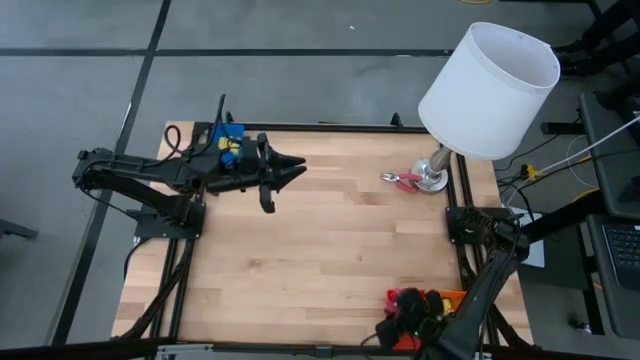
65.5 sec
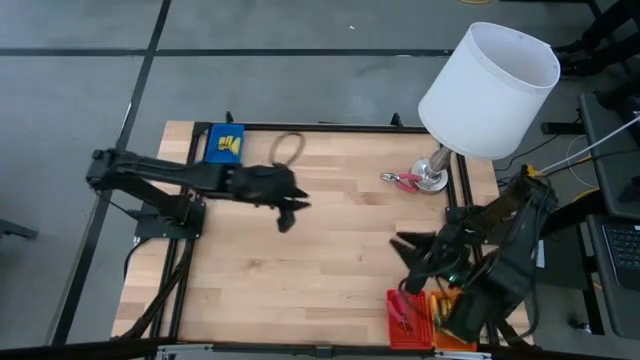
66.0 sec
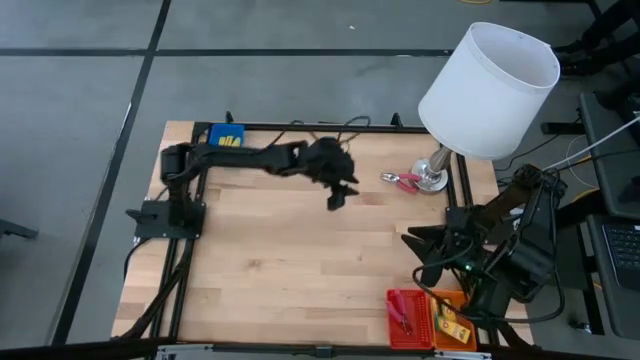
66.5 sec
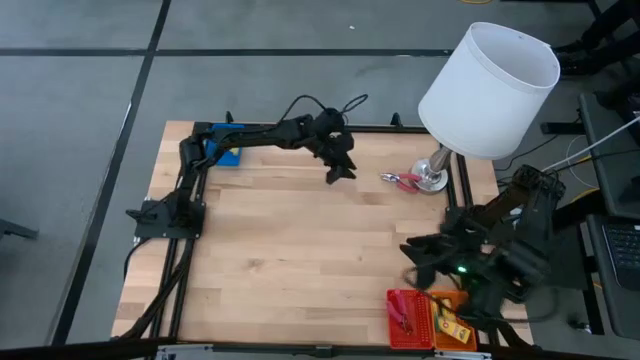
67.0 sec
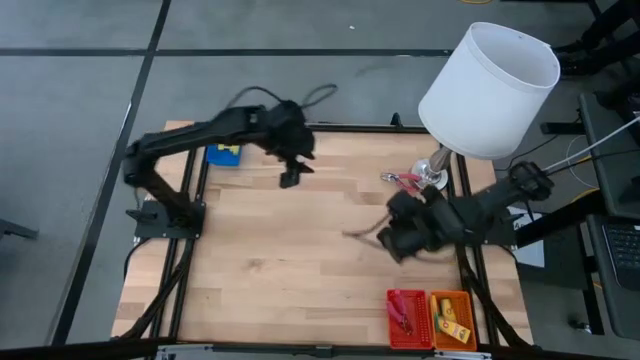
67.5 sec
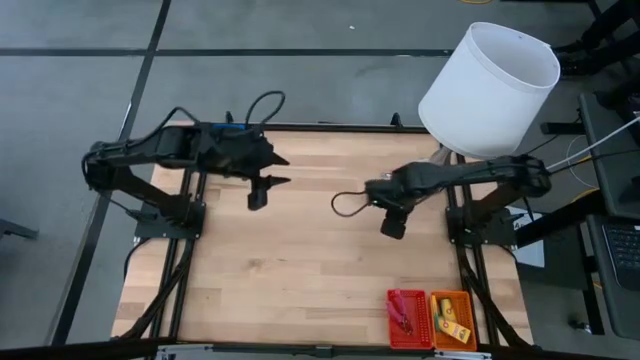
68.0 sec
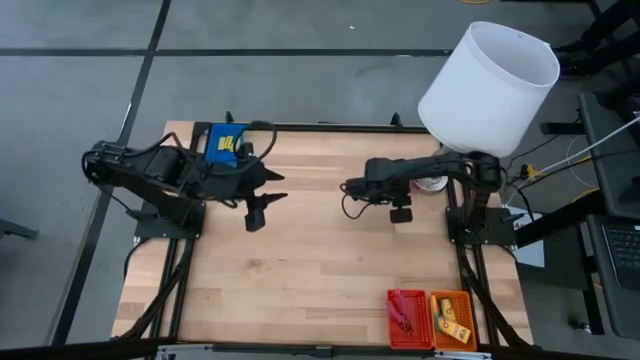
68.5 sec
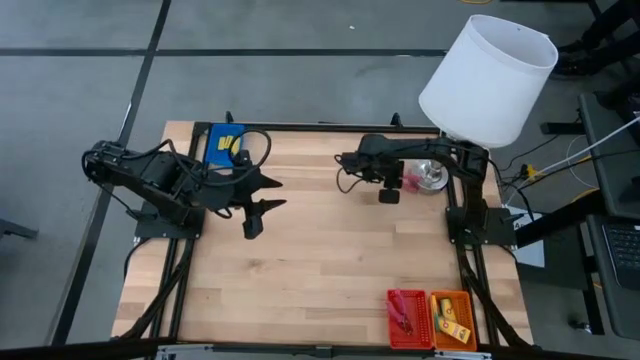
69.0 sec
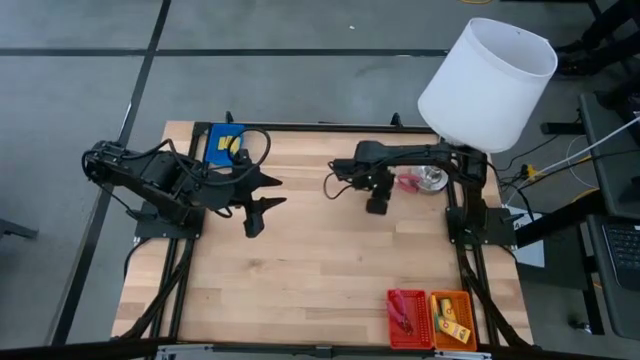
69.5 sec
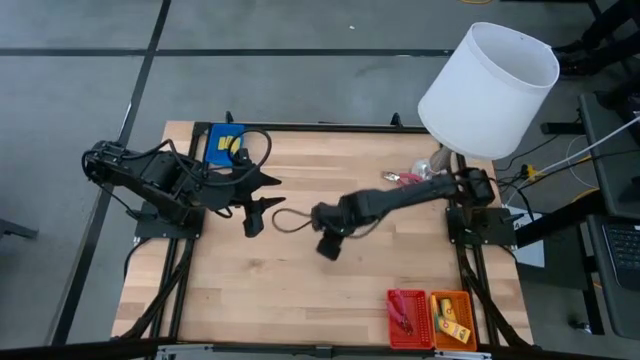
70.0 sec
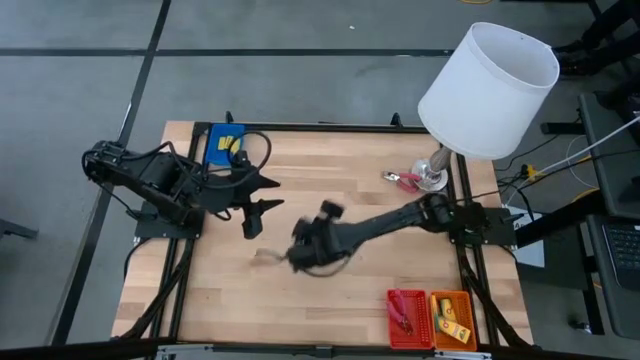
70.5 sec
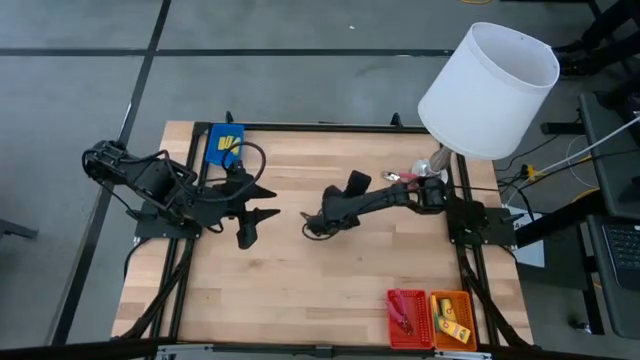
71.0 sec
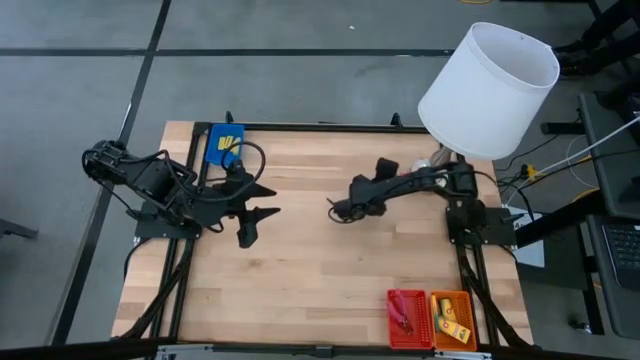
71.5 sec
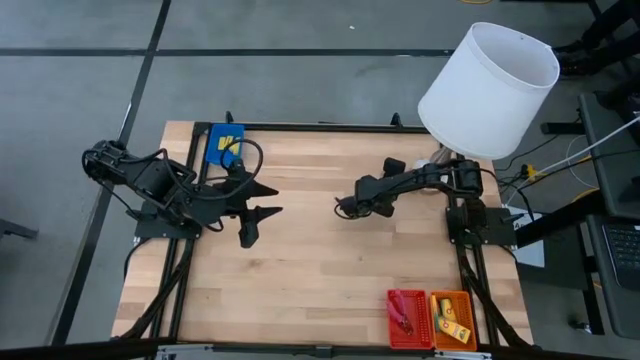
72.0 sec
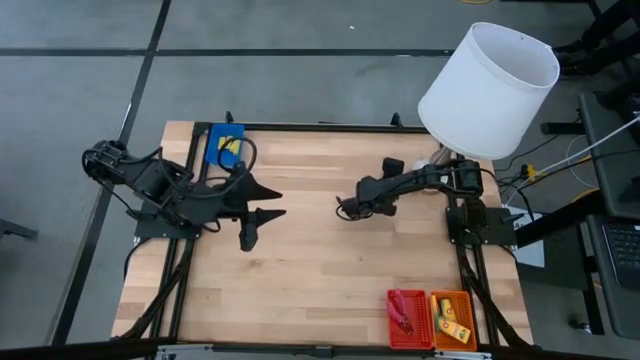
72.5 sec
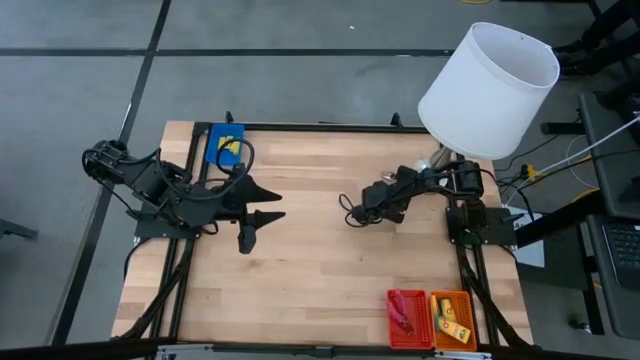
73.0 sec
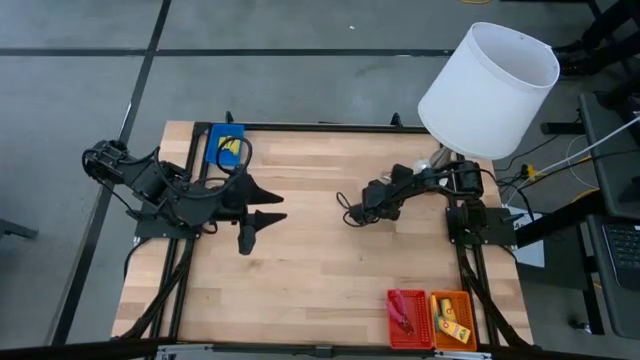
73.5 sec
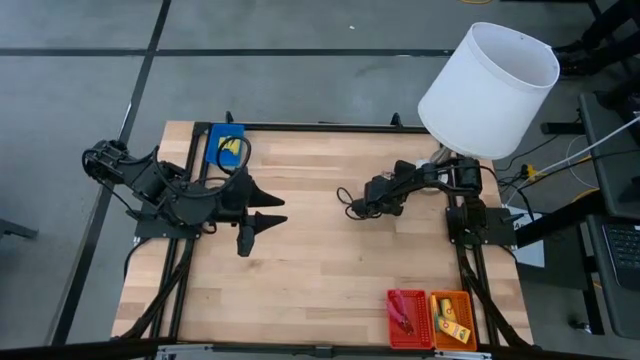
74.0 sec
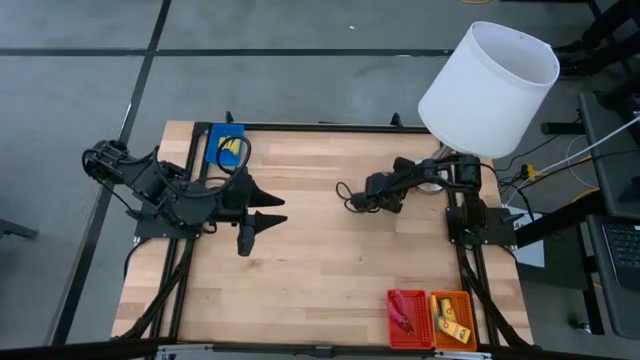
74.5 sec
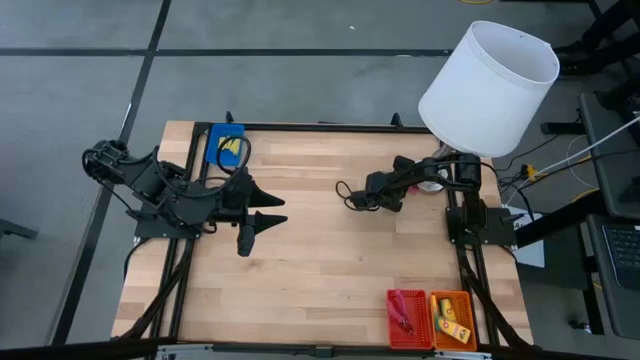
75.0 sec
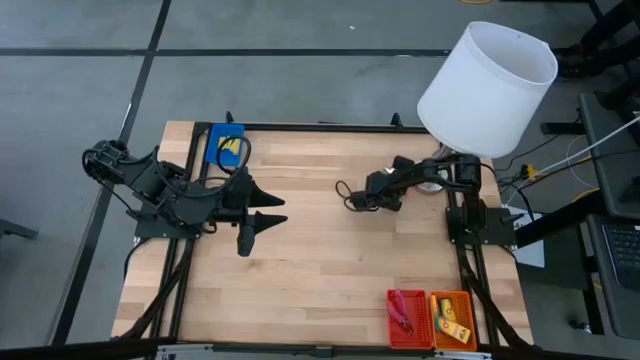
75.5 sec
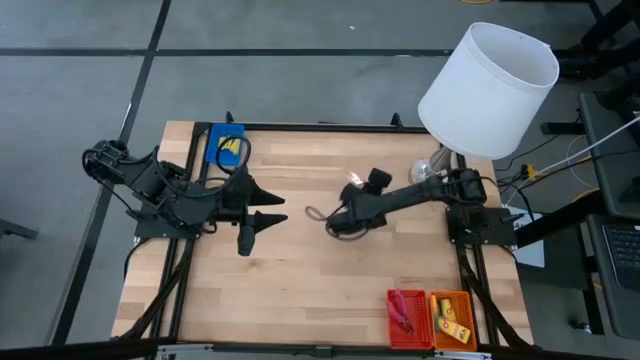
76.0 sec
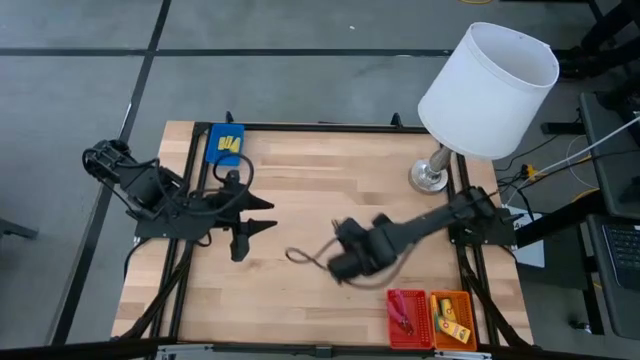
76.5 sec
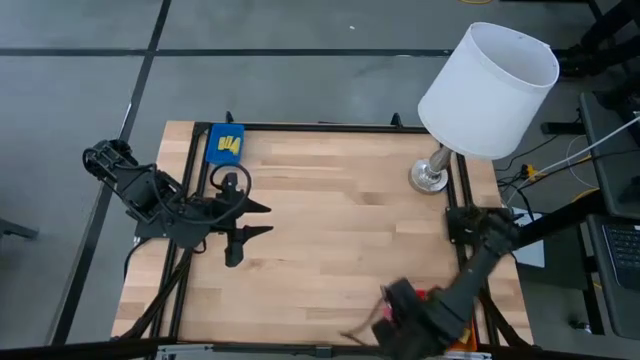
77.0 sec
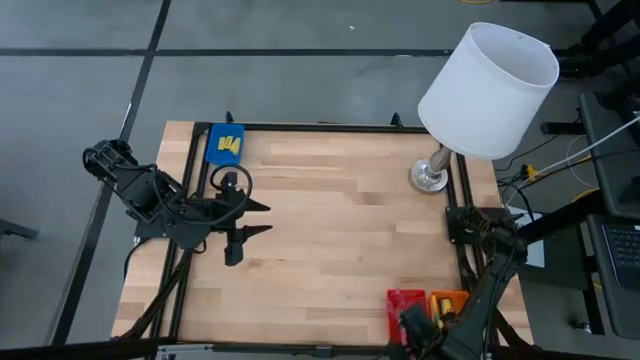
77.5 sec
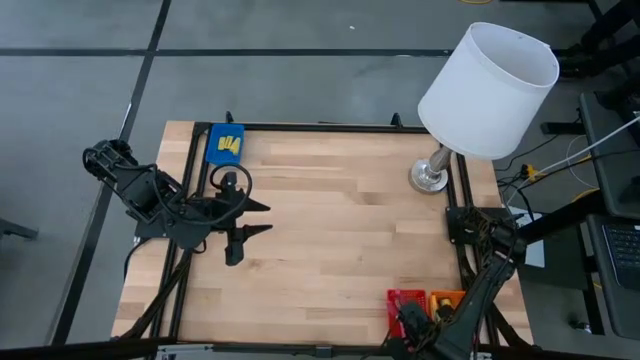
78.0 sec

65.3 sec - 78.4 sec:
Task: Pick & Place School Supplies
Put the pink hole puncher into the red bin

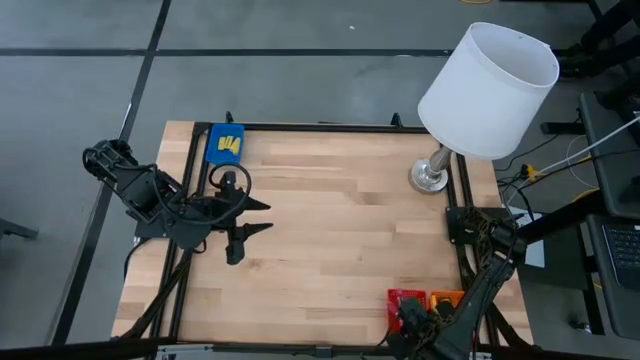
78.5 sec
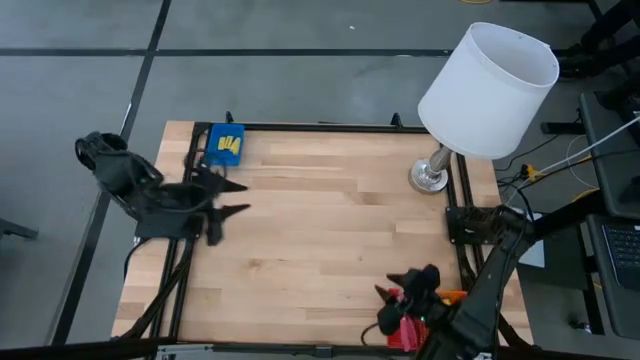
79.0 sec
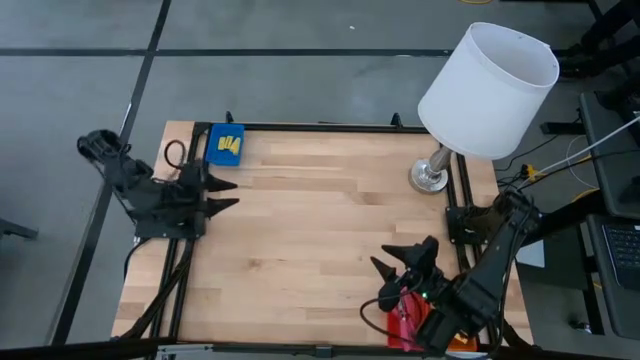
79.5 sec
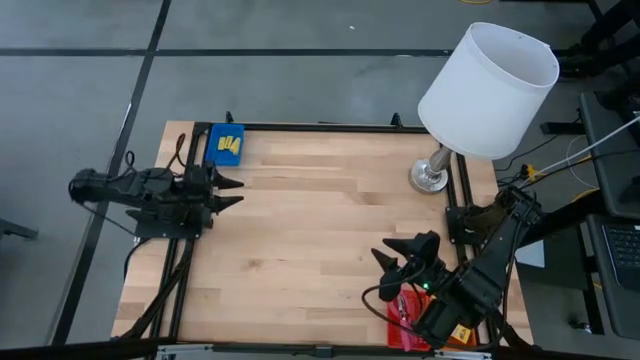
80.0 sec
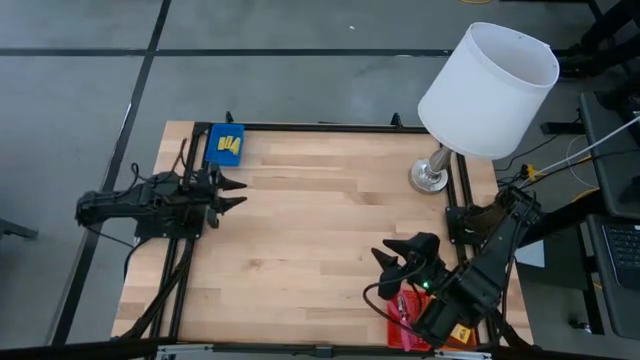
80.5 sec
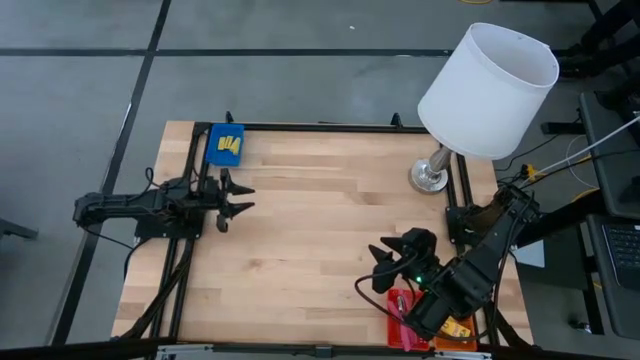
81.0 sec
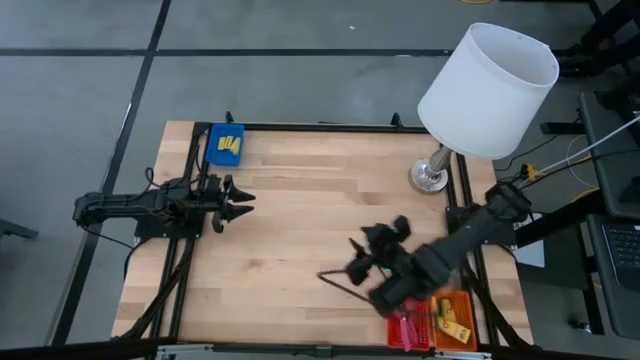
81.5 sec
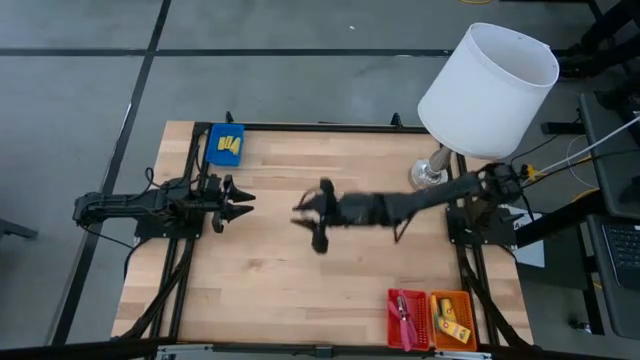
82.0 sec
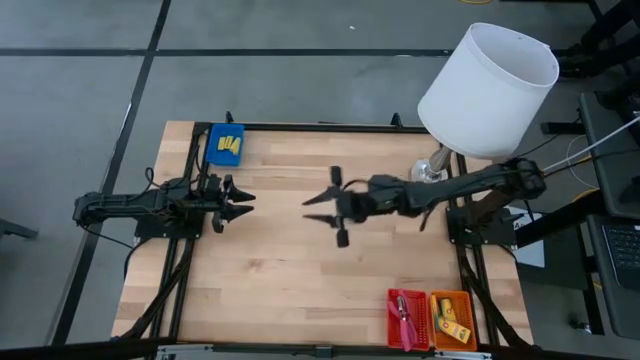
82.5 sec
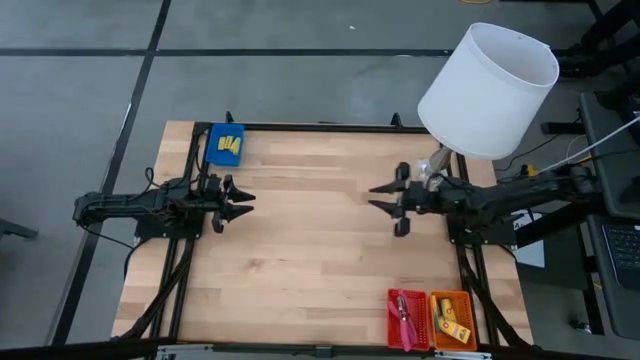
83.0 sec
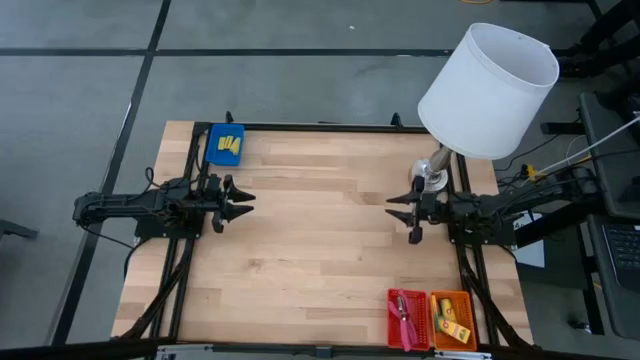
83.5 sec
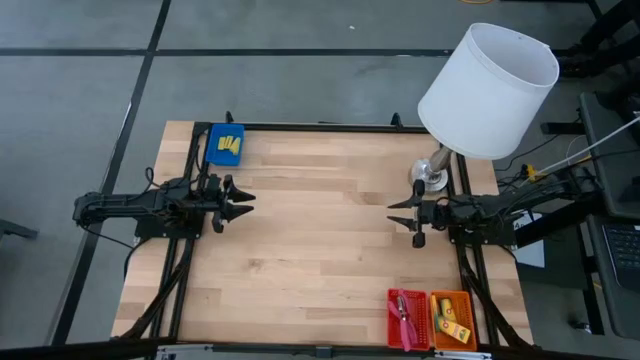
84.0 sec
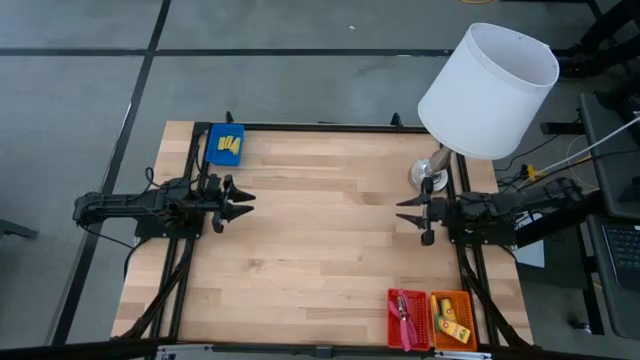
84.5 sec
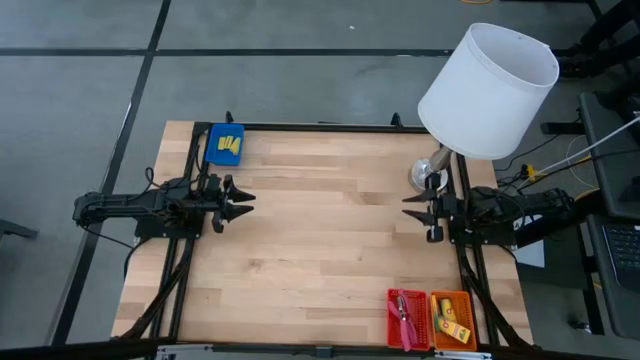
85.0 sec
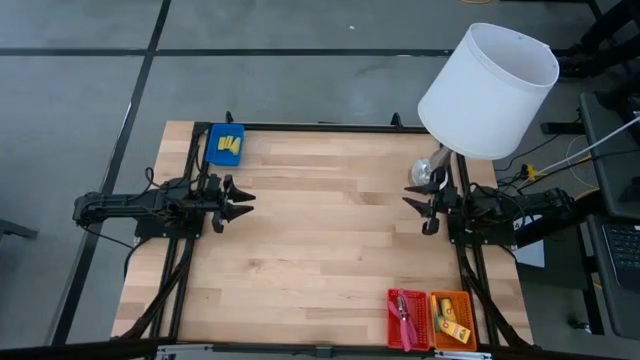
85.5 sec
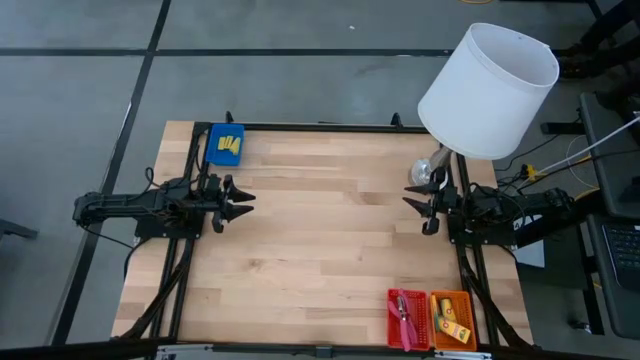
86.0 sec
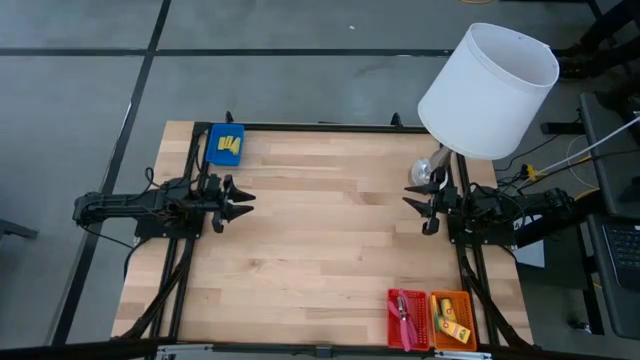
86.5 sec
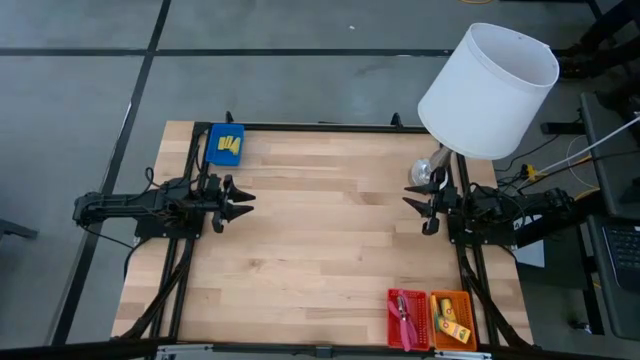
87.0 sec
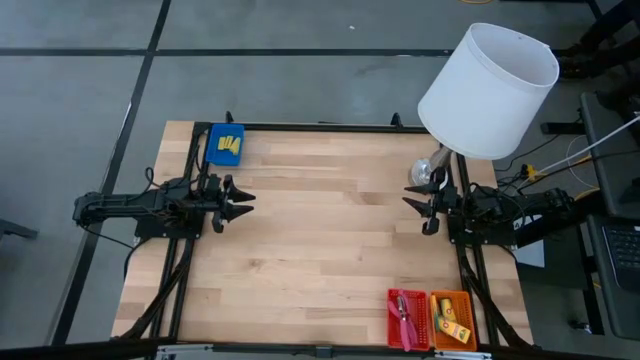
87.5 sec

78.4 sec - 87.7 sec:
Return to Home Position
